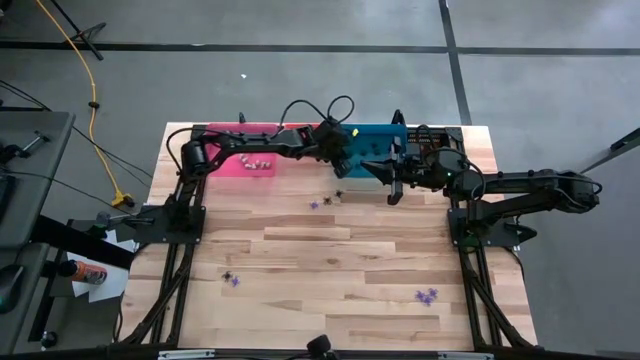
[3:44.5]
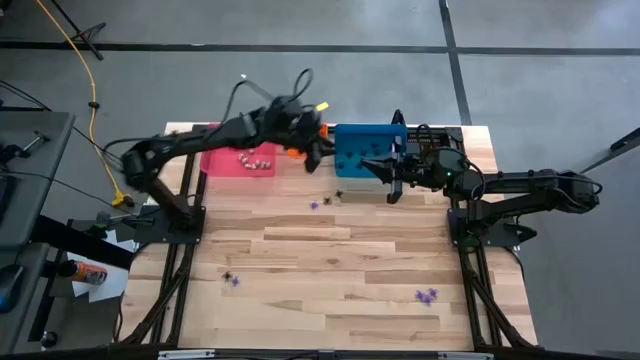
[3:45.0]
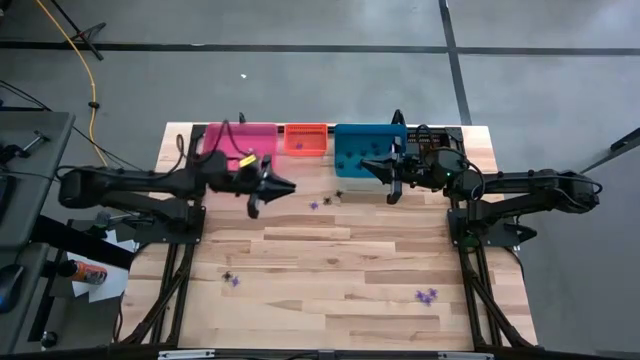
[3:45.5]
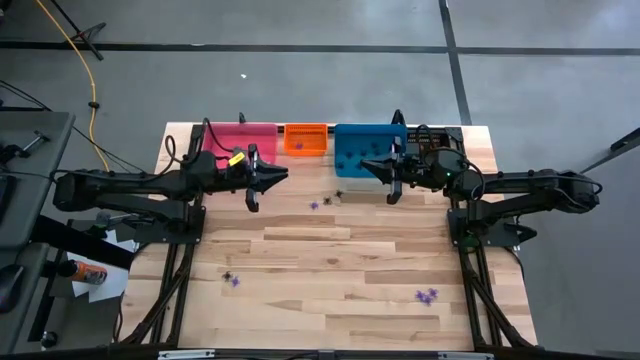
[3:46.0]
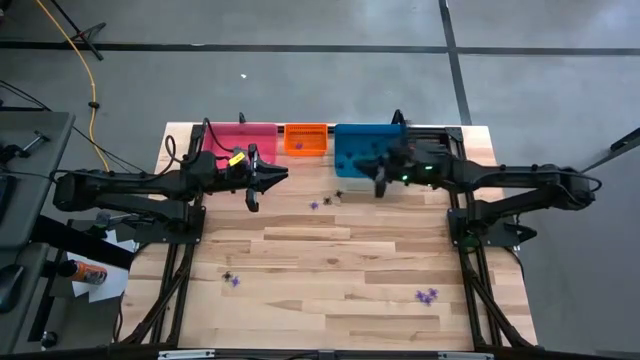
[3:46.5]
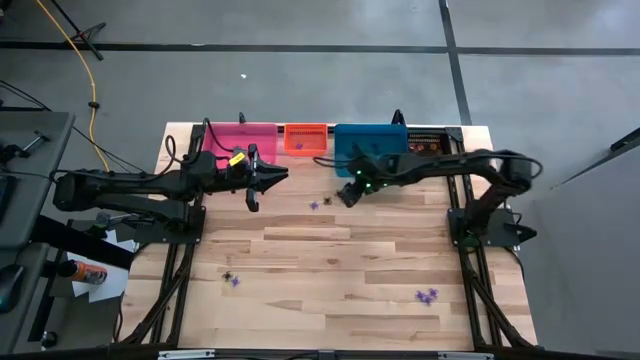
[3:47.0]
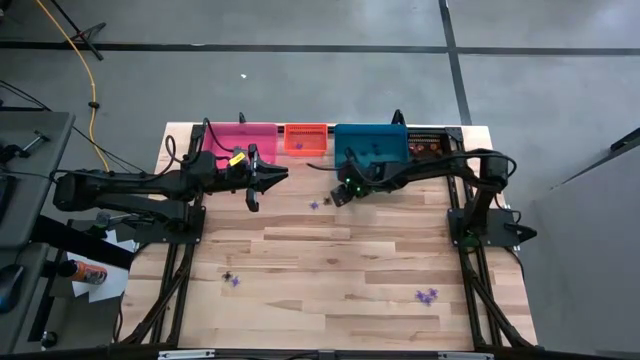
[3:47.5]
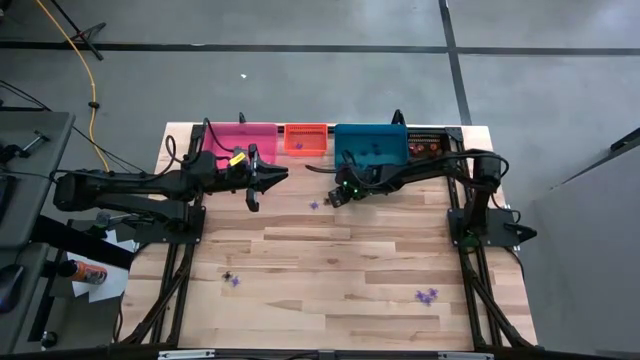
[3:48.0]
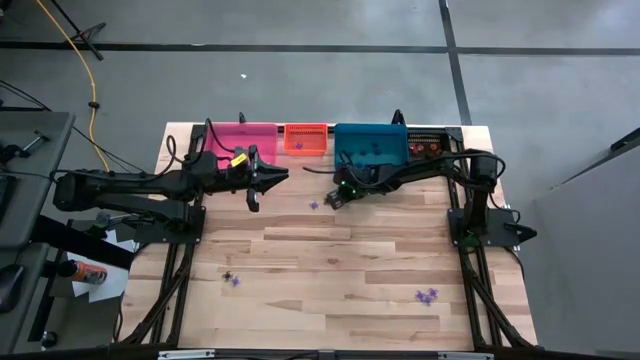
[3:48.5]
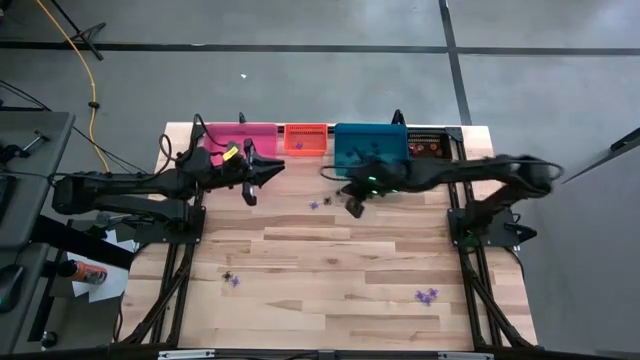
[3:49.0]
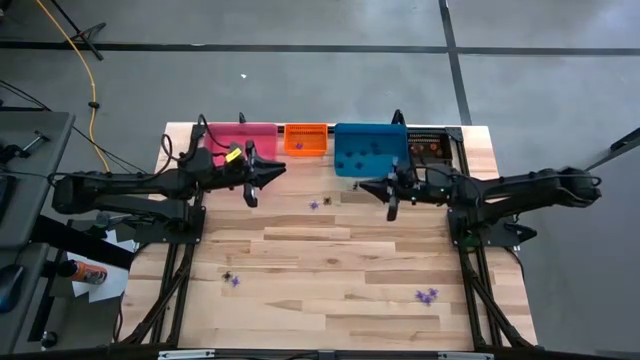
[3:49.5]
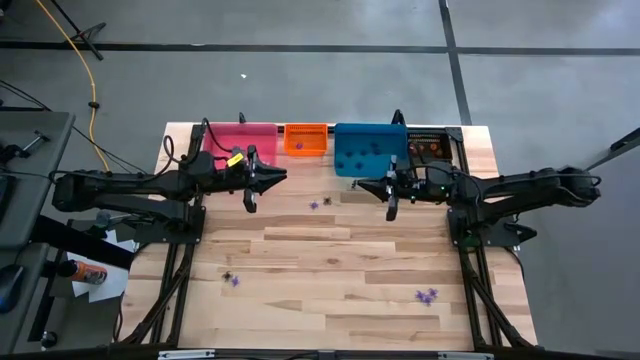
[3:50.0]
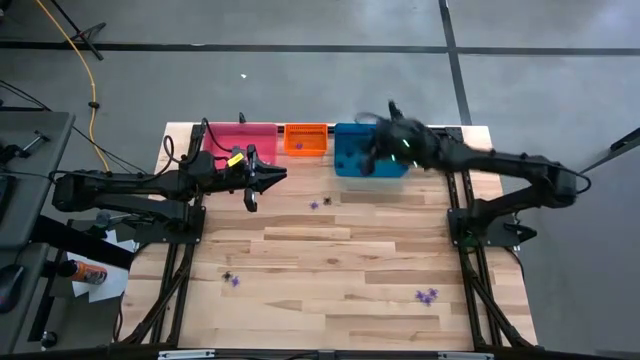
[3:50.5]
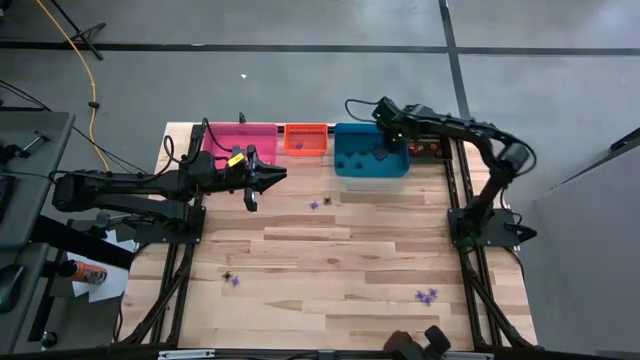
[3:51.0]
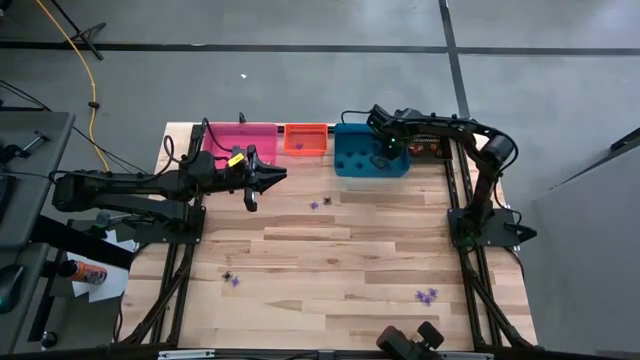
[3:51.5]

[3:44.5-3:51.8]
Task: Sort Halloween decoration
Put the black spider toy into the blue bin

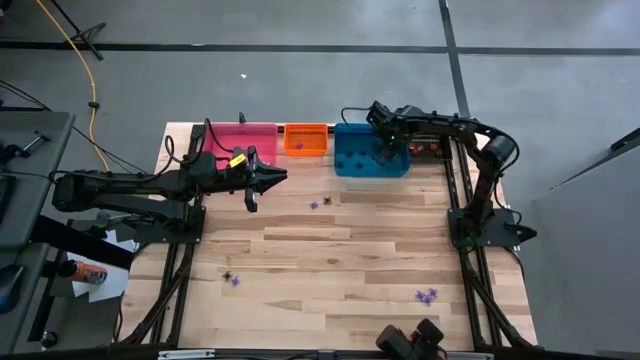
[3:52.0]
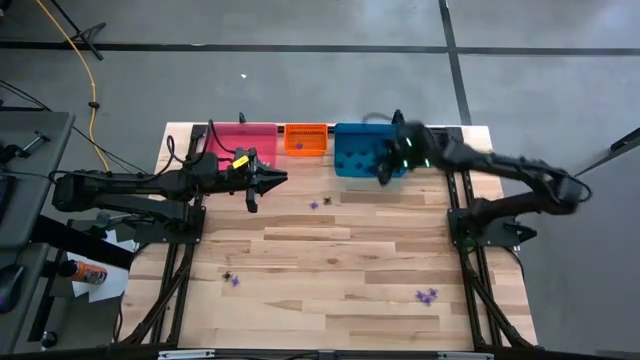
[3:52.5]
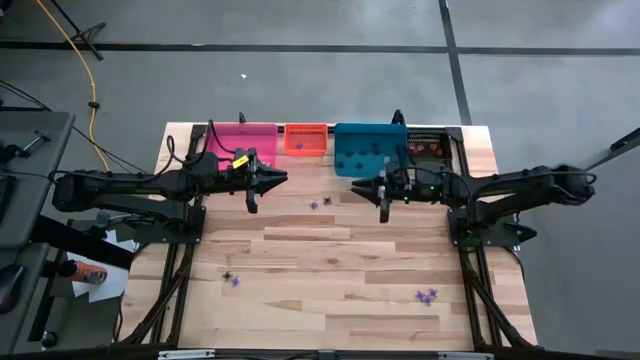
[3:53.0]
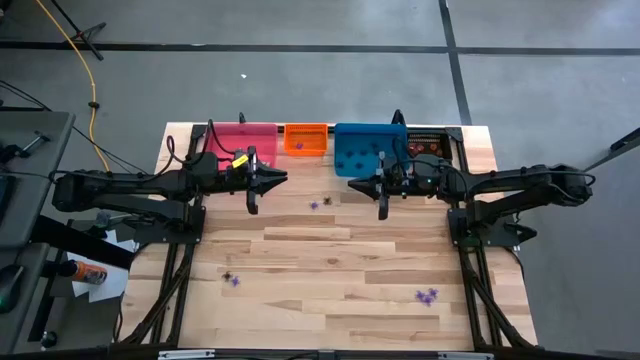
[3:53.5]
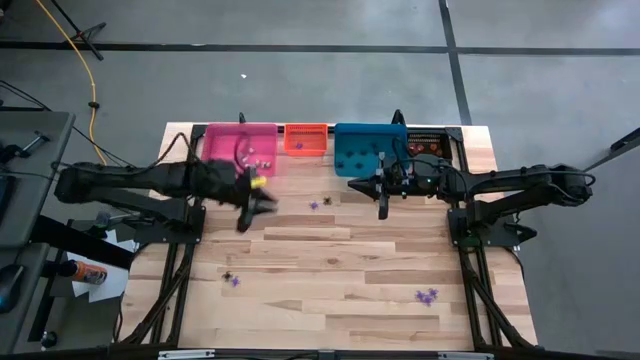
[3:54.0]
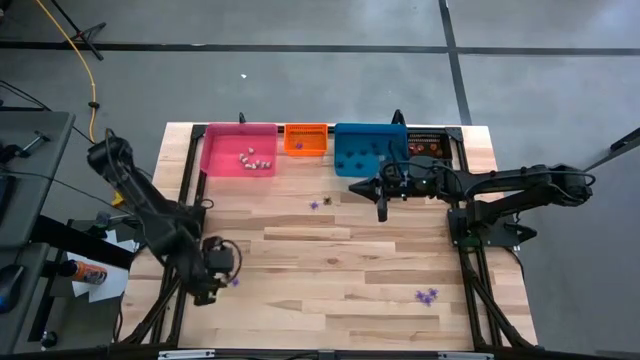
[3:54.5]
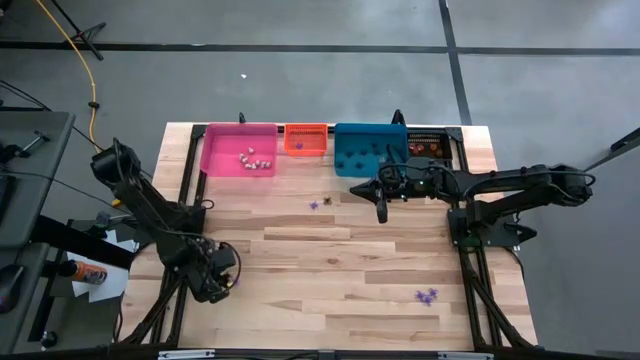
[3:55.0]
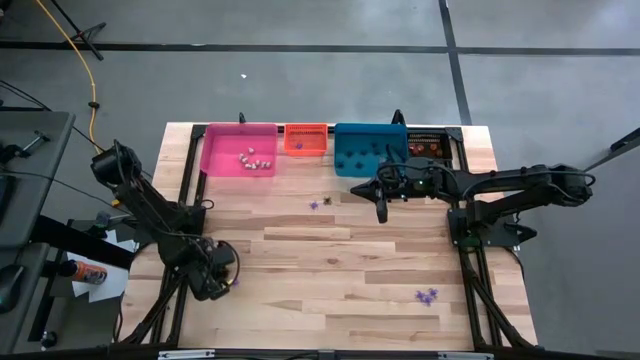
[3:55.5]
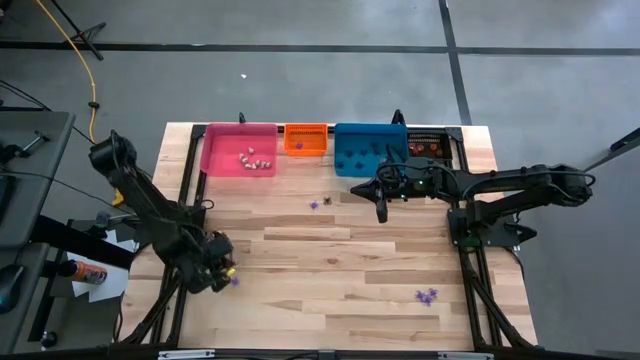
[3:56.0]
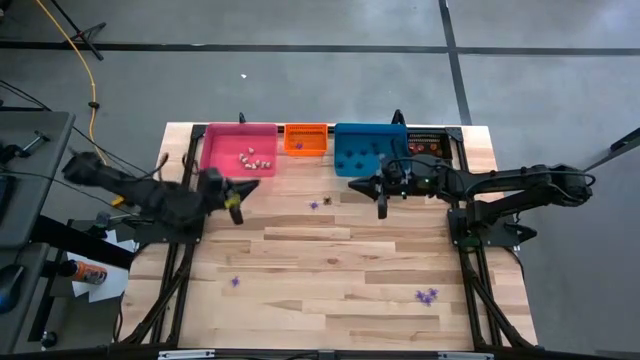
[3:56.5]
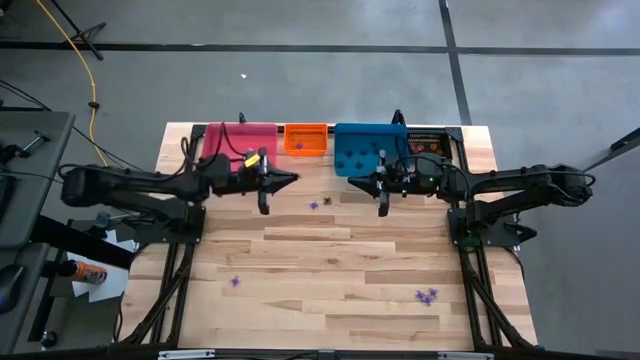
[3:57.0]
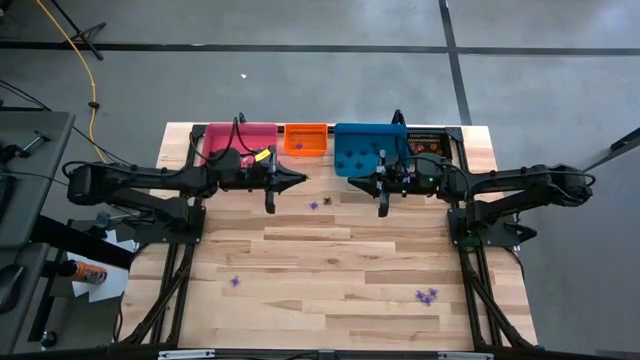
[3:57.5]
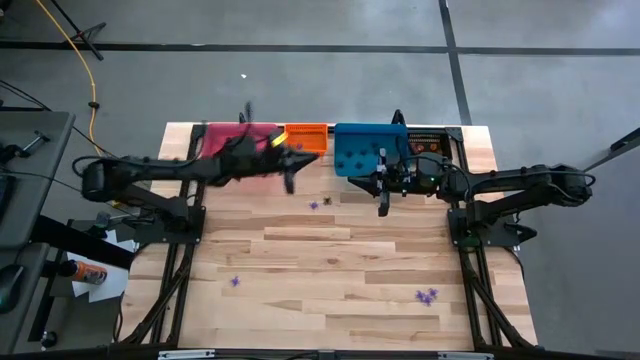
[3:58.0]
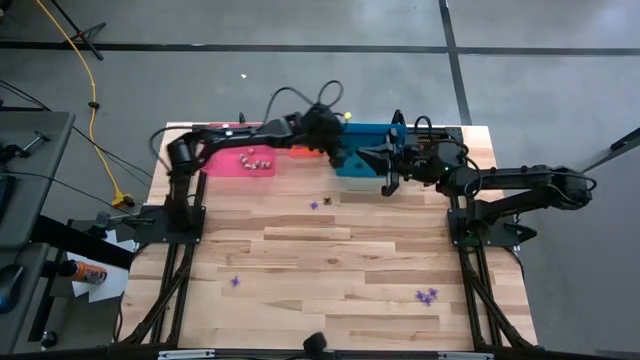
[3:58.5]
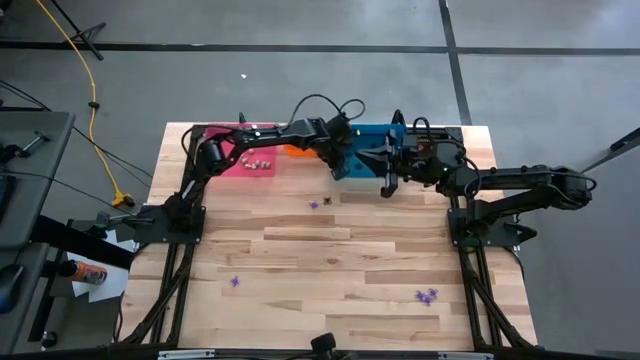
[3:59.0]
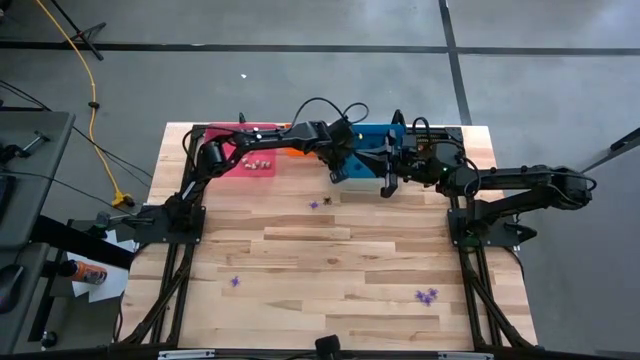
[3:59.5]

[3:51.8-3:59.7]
Put the black spider toy into the blue bin

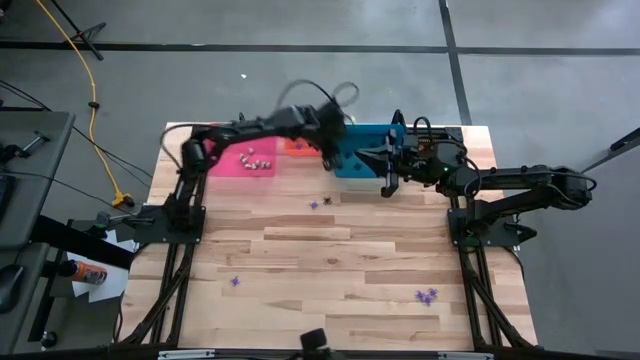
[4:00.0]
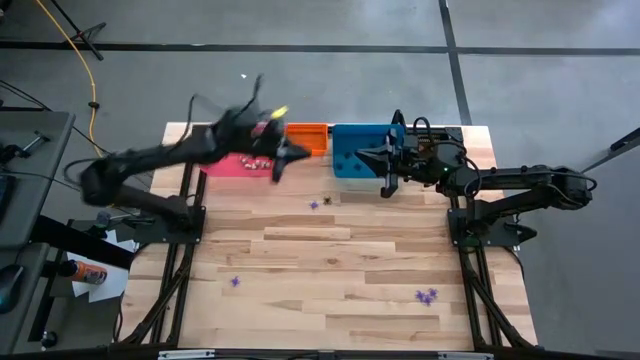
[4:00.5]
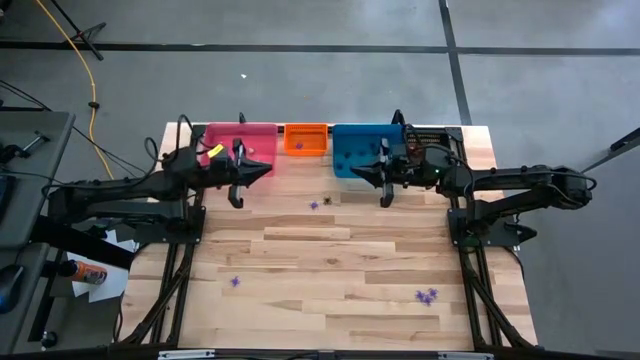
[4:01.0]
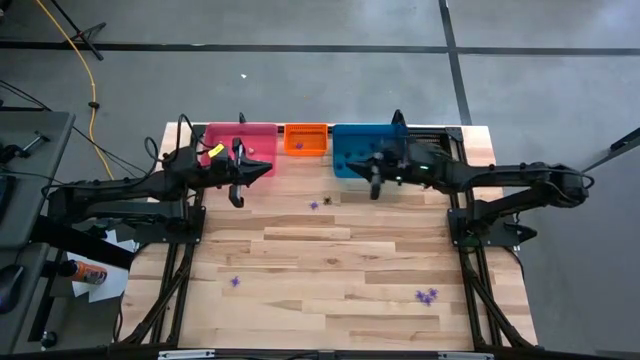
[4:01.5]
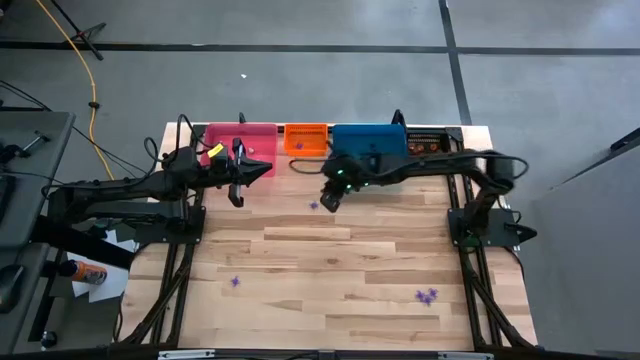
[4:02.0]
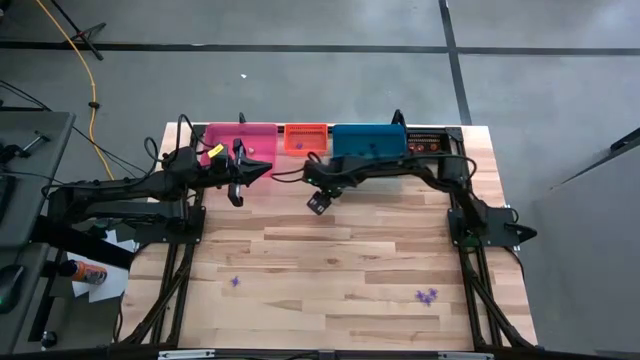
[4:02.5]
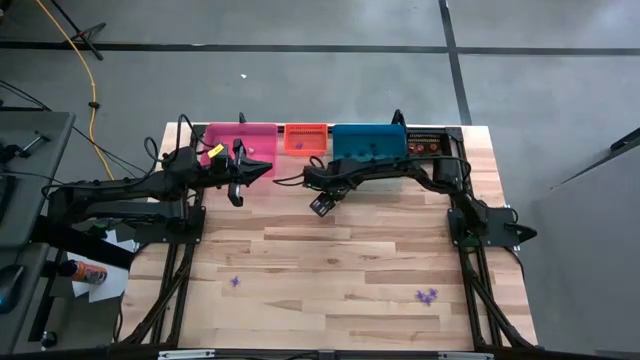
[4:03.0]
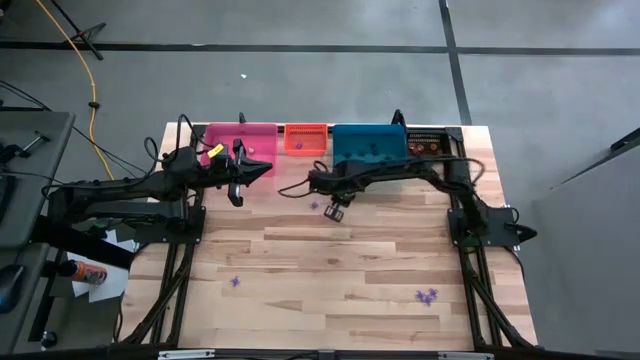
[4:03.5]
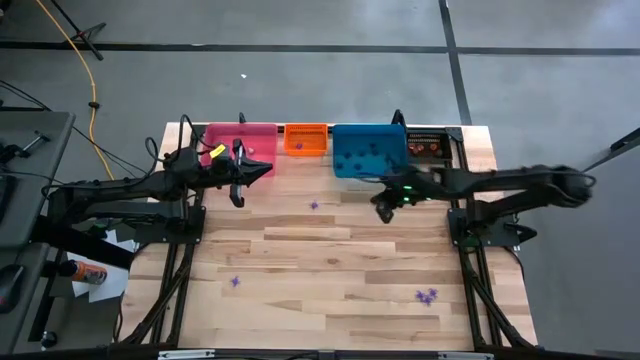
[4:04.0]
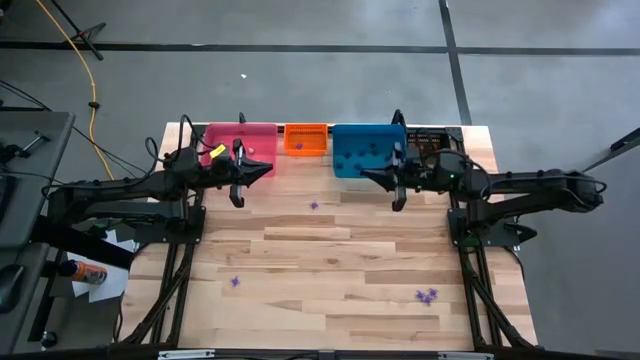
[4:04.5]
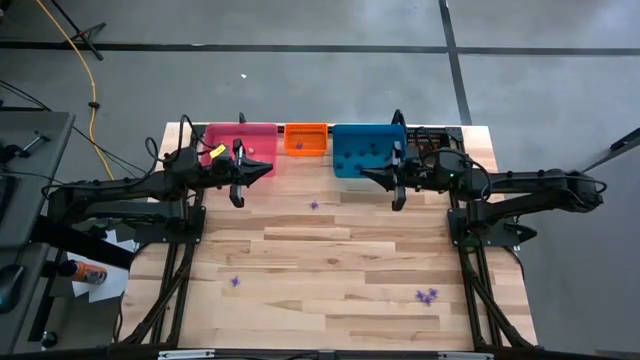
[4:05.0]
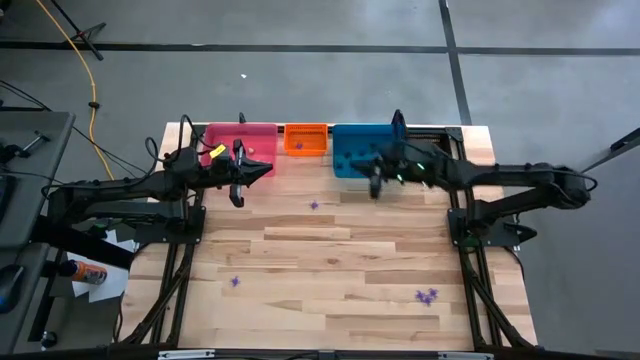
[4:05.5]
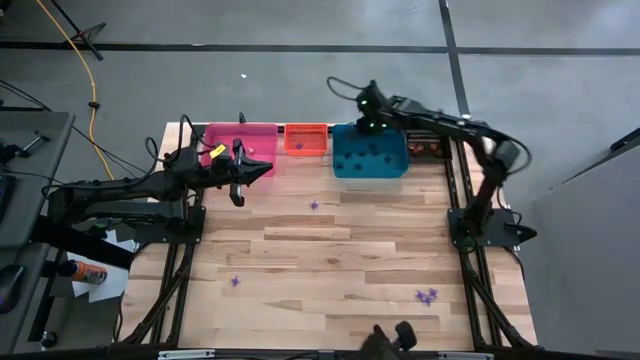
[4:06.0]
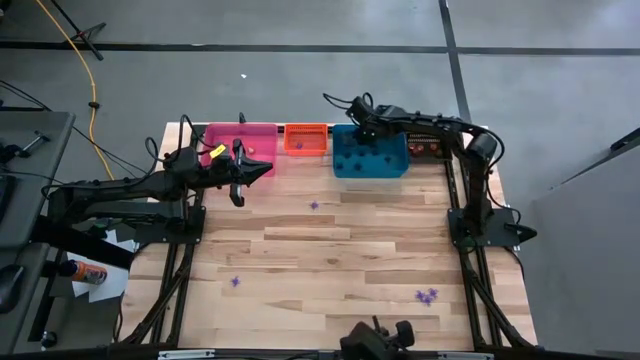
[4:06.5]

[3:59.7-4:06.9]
Put the black spider toy into the blue bin
